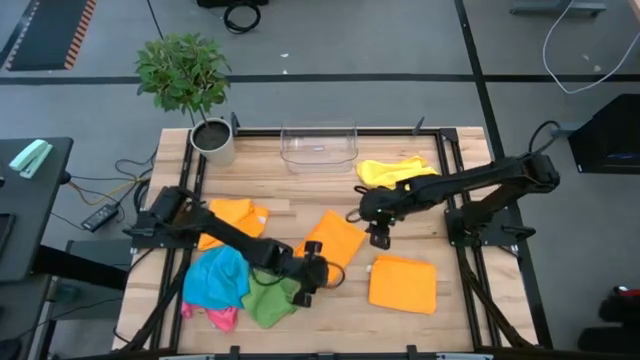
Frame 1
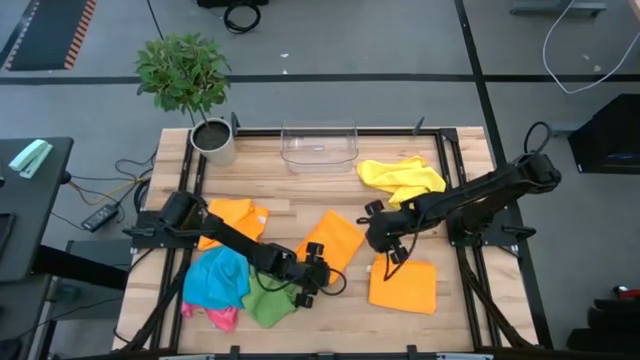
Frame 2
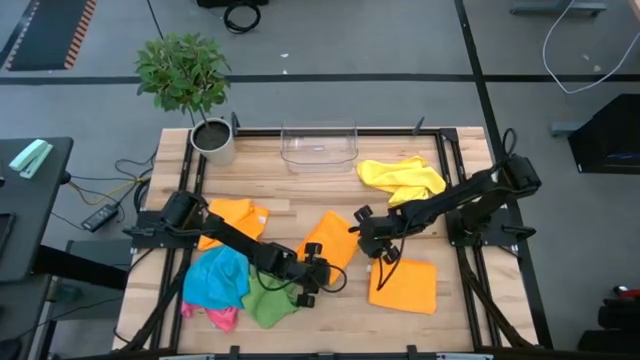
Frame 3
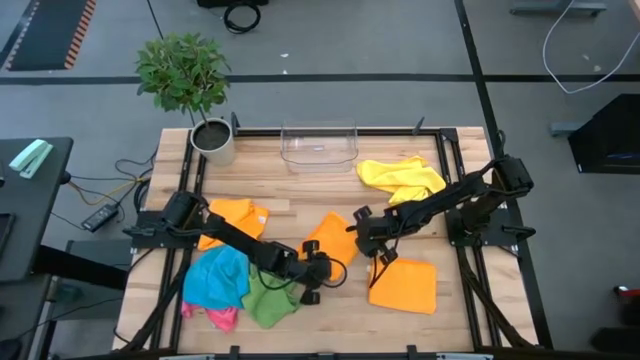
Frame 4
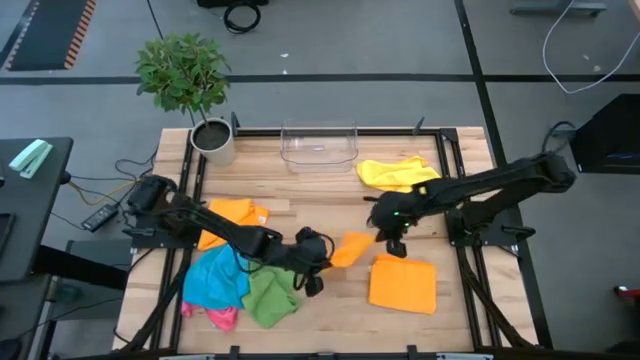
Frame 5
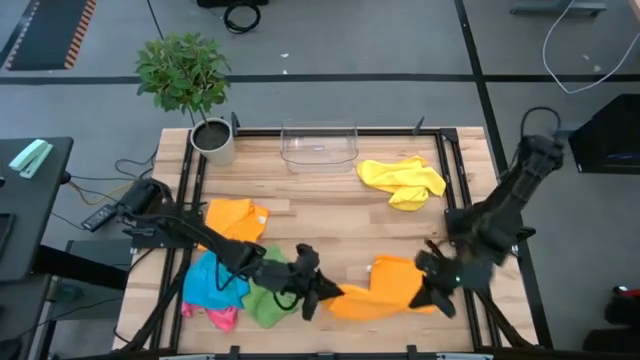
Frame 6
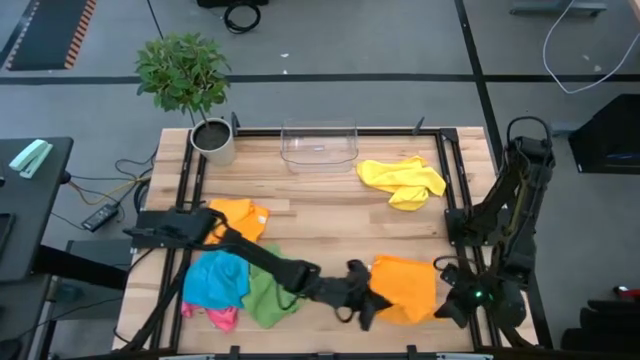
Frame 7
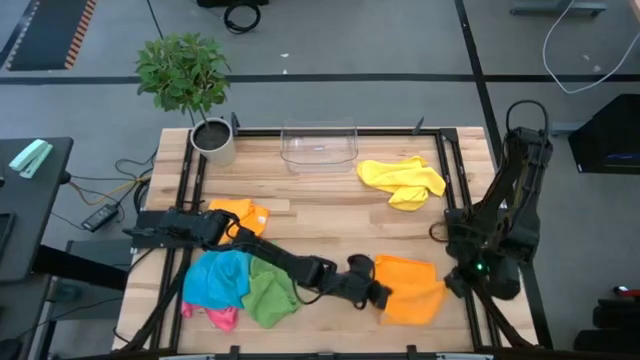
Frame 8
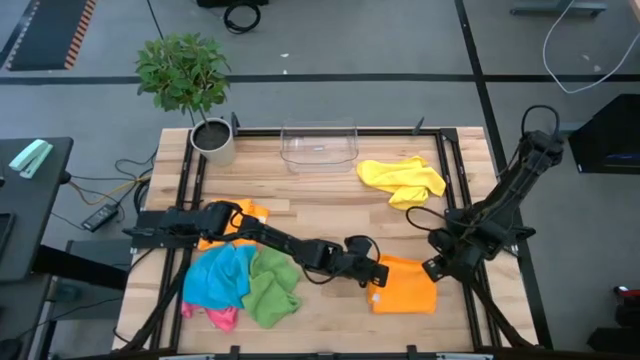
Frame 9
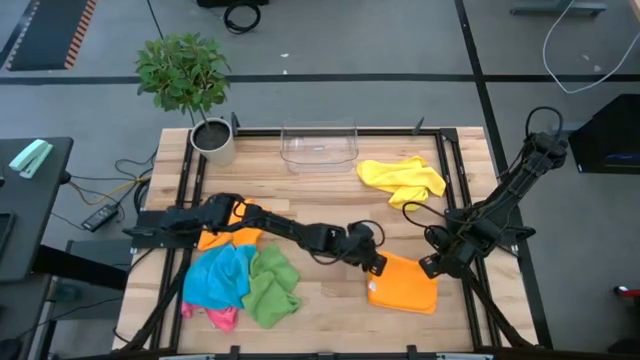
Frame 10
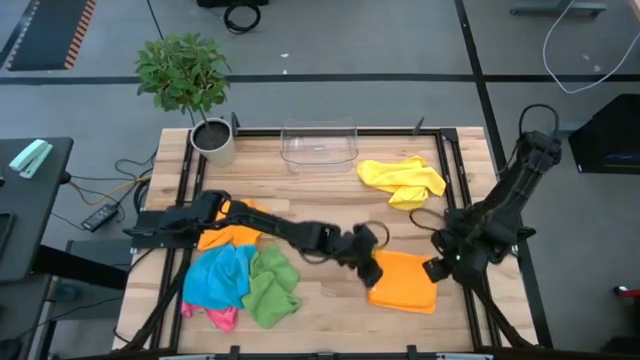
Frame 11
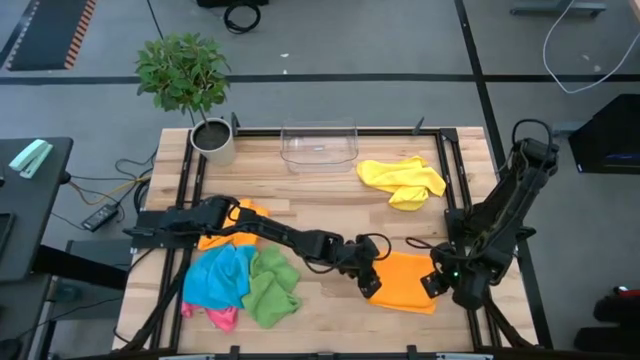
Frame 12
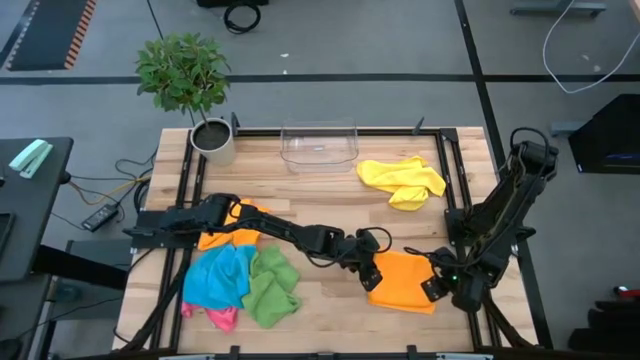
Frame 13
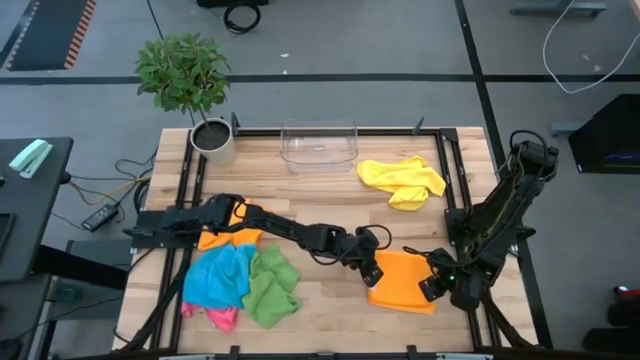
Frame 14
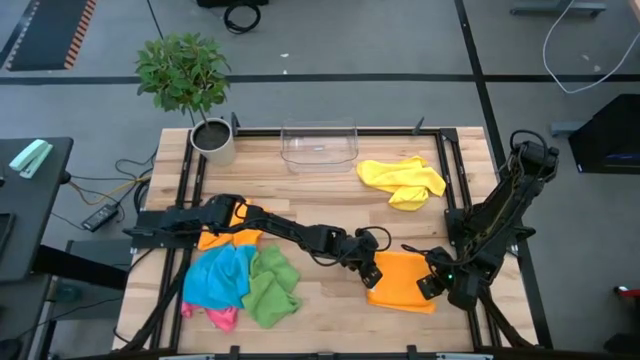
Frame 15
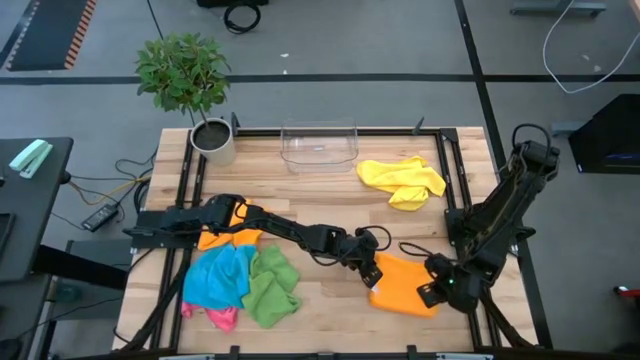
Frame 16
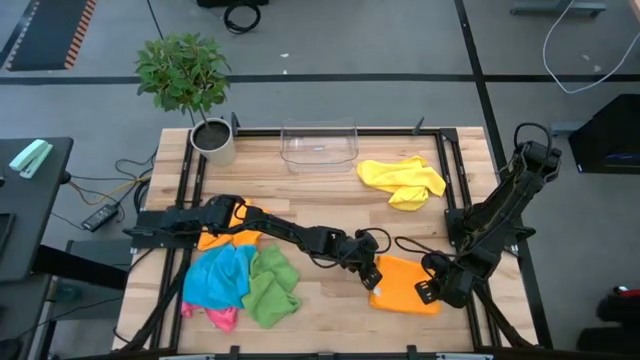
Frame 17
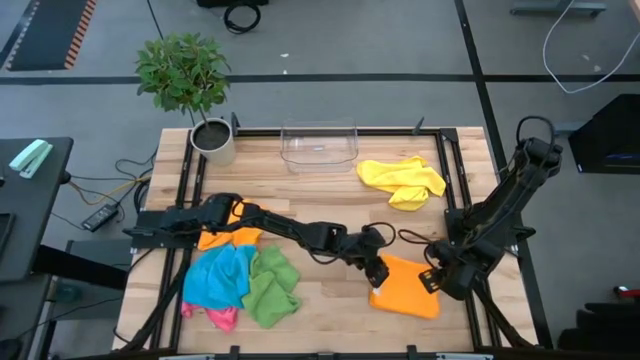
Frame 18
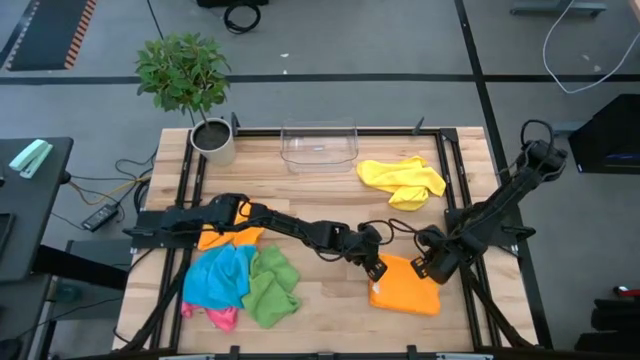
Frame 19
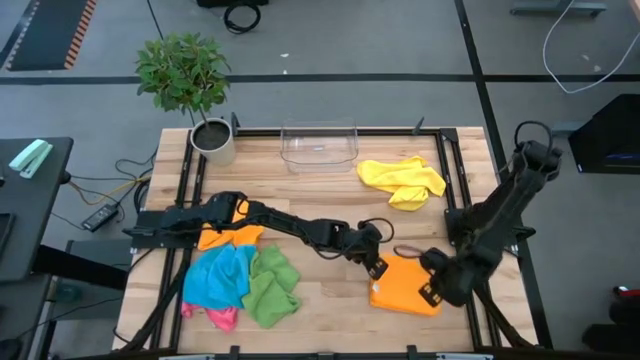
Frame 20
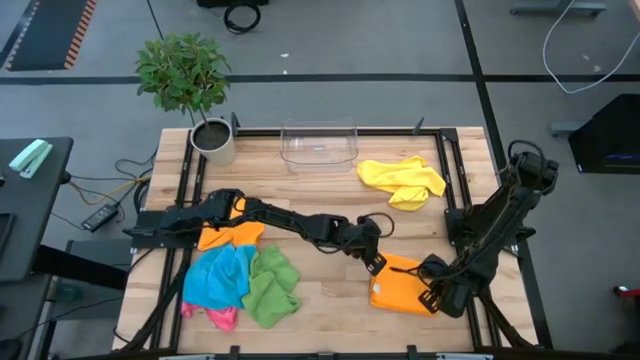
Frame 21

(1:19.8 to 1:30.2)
Task: Fold microfiber towels
Stack the middle orange towel on the bottom orange towel
